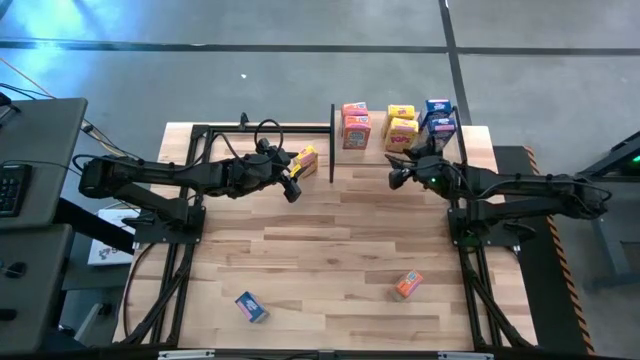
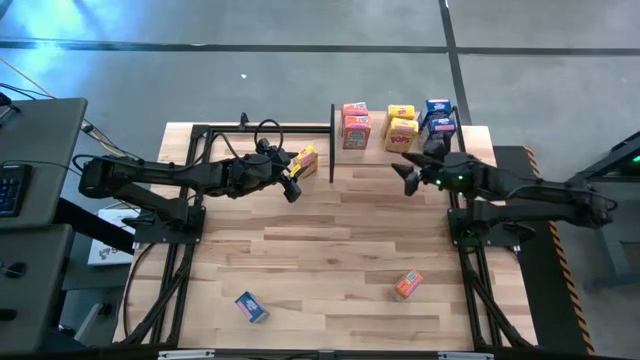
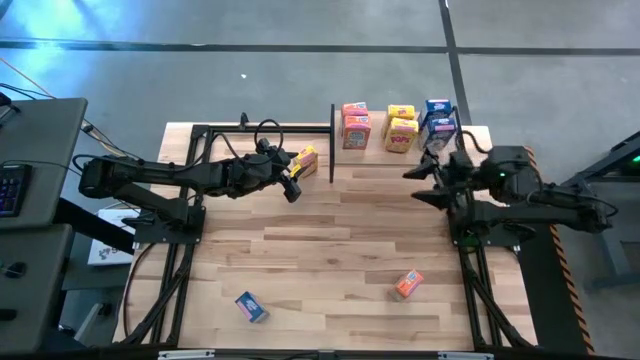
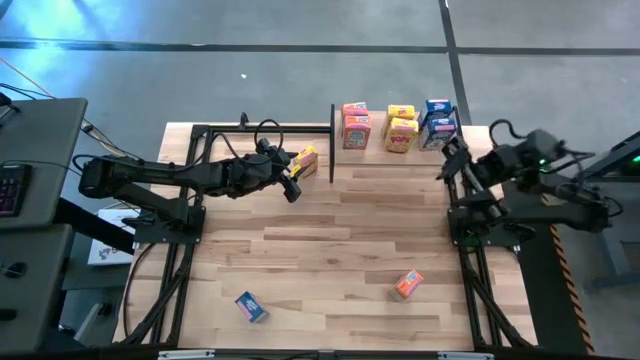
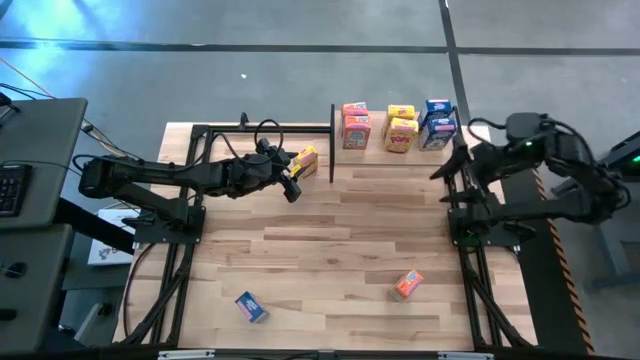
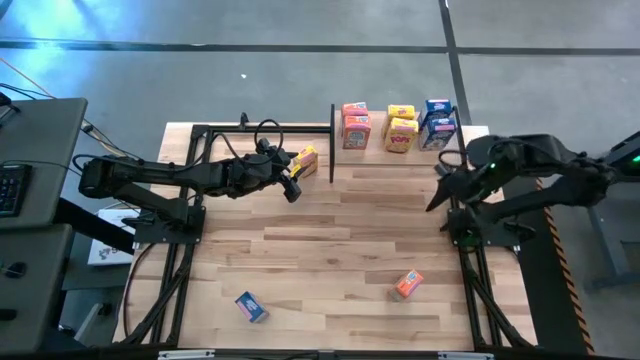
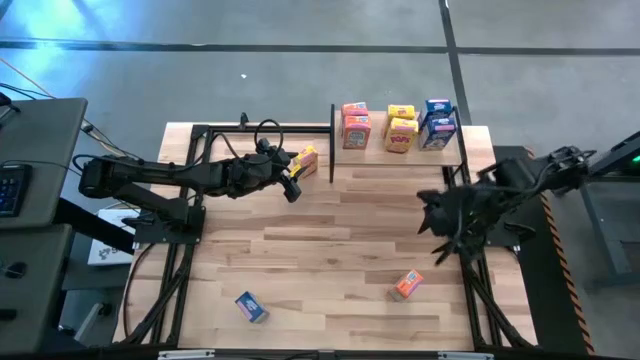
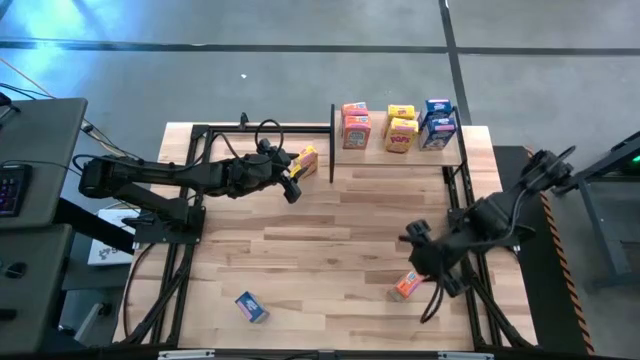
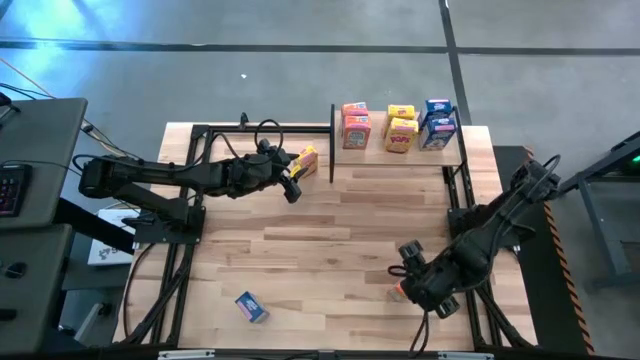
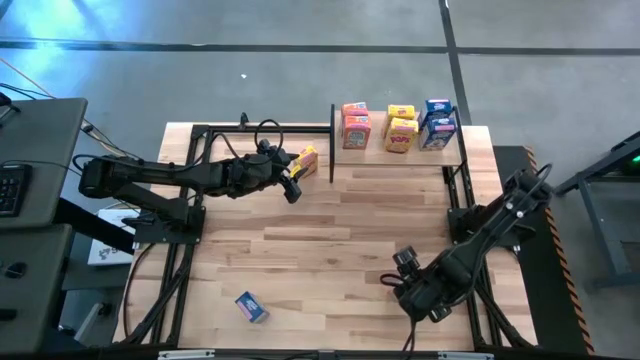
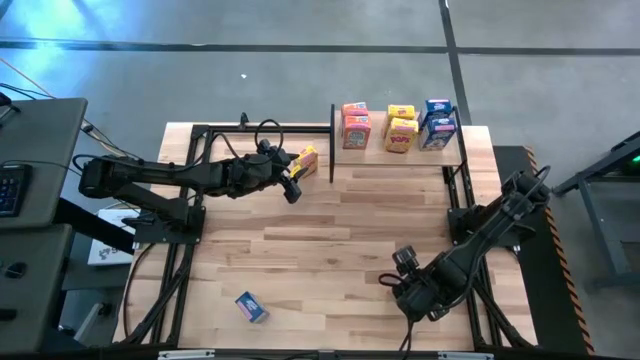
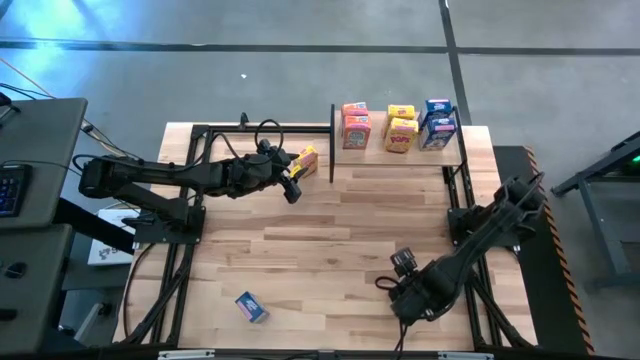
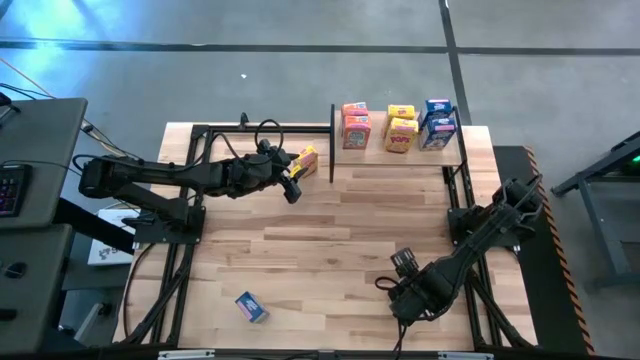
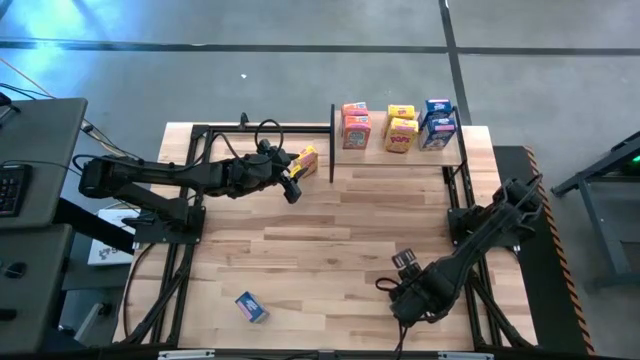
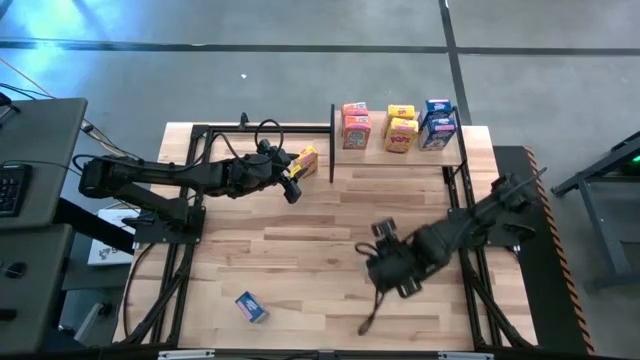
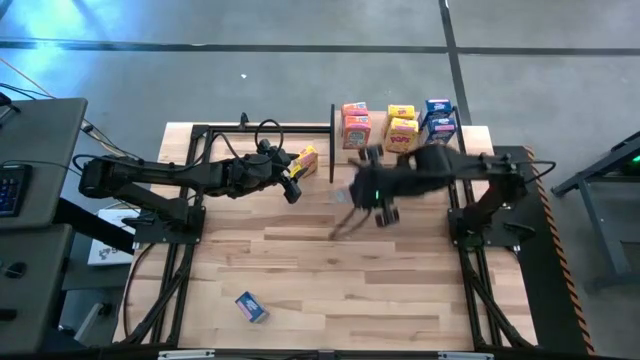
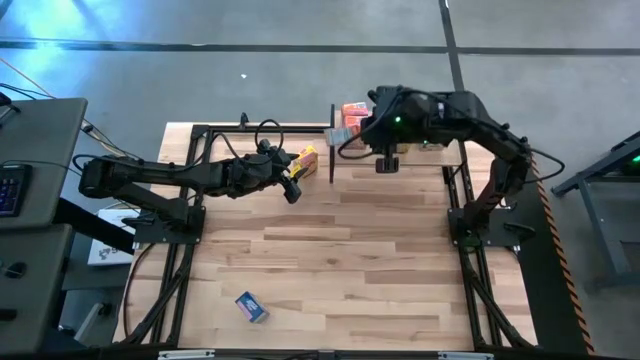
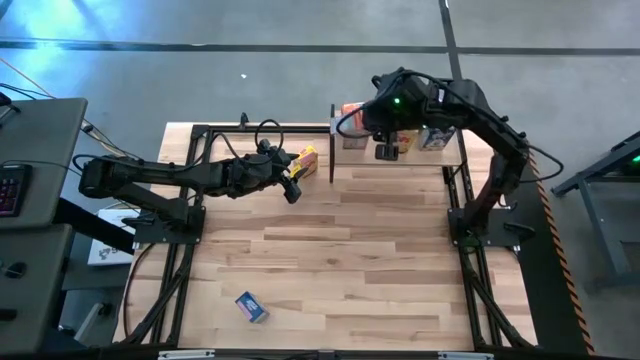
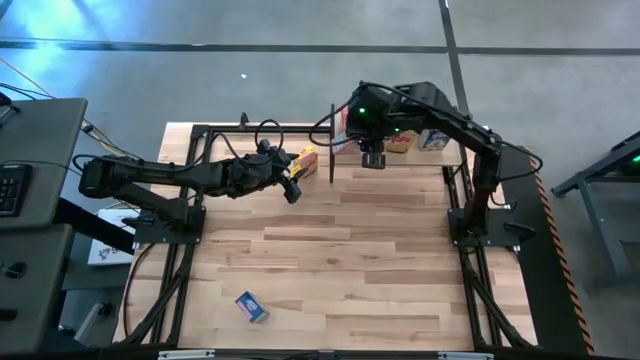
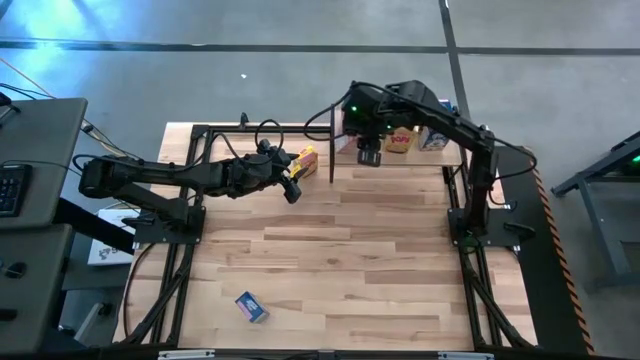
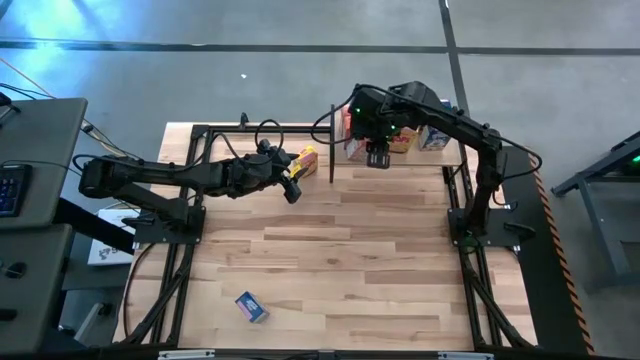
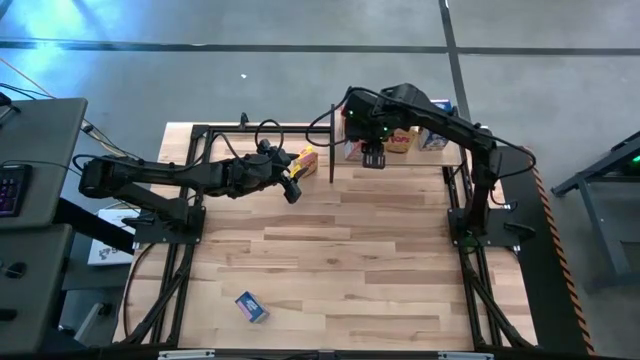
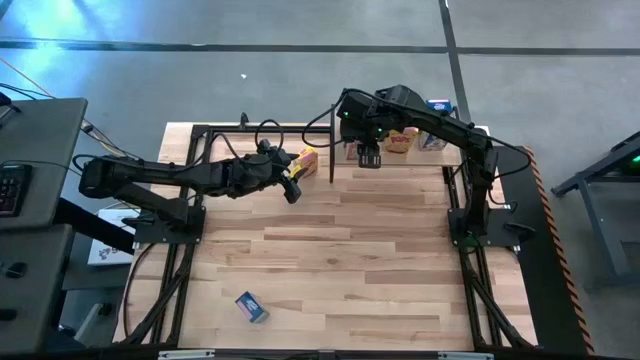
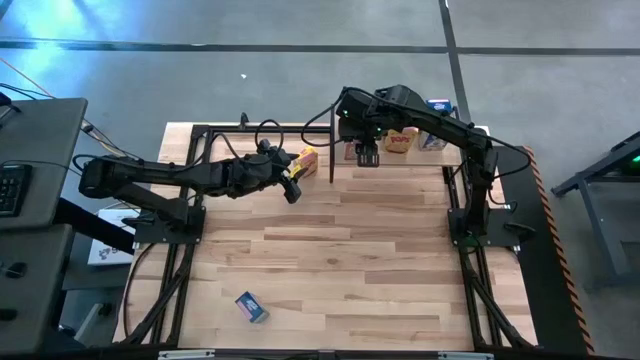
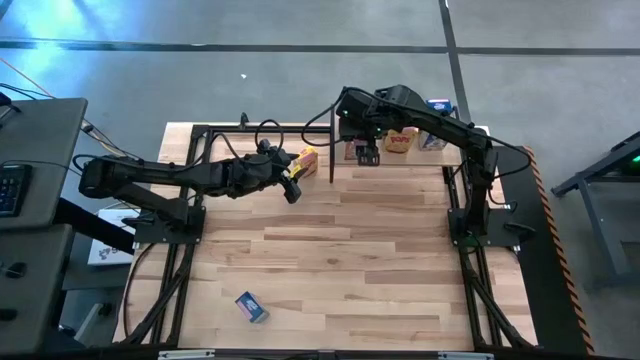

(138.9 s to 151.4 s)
Task: Stack cereal on shelf
Put the orange cereal box on the shelf aligned with the other orange cereal boxes
